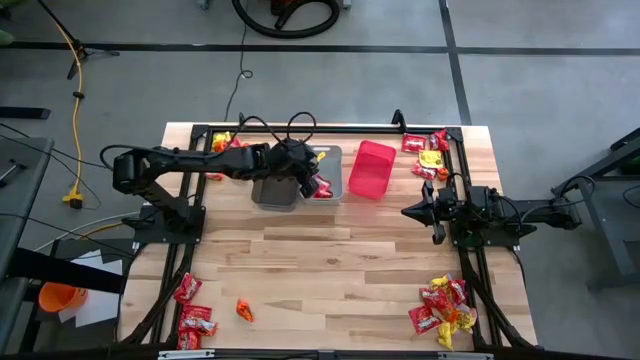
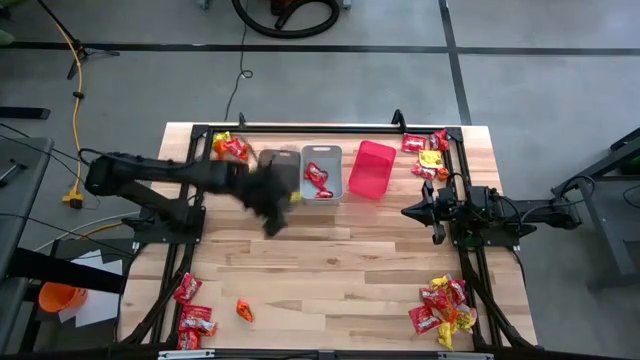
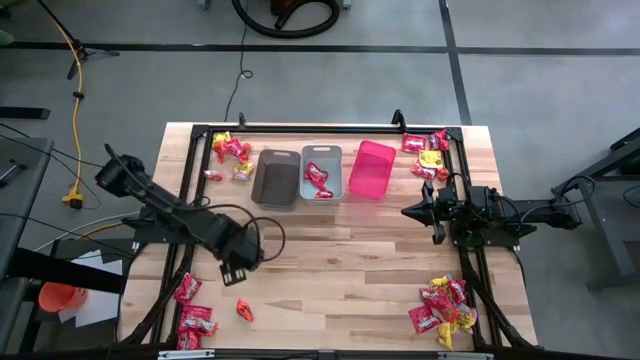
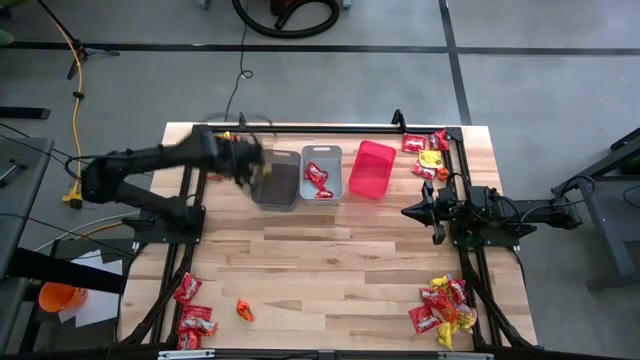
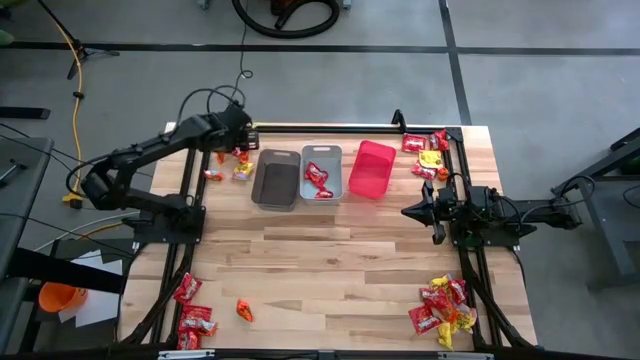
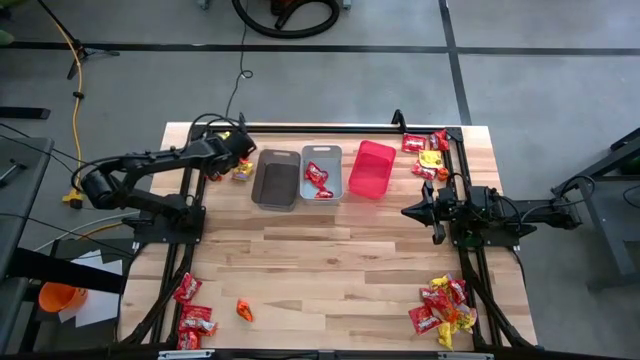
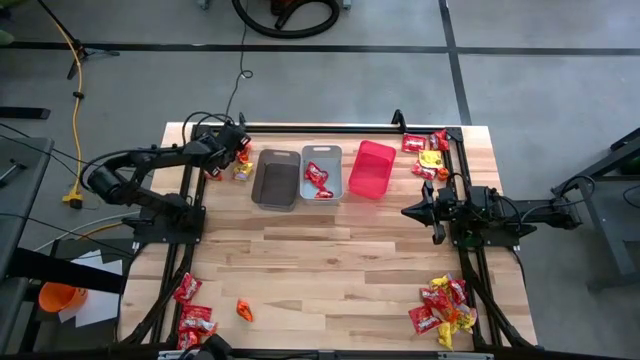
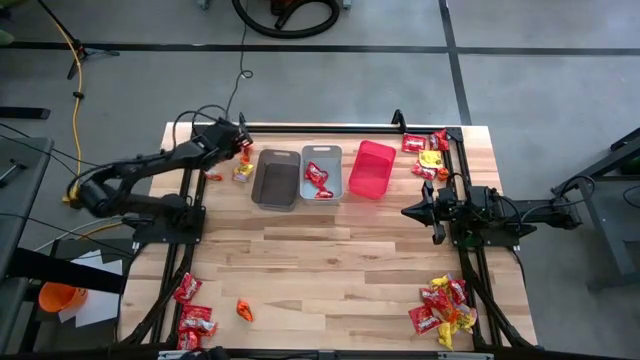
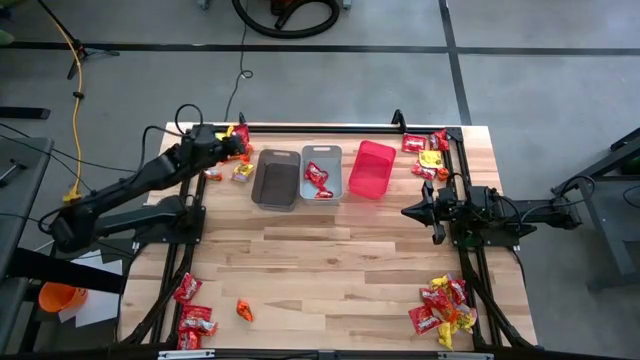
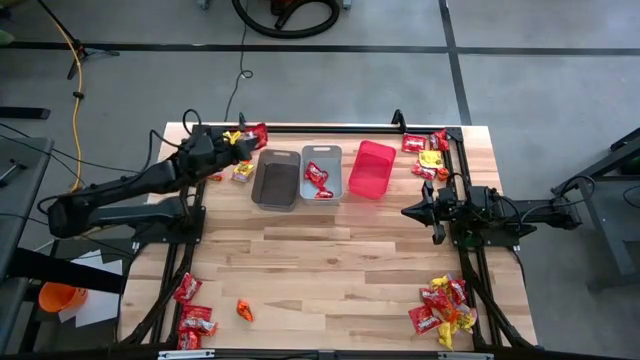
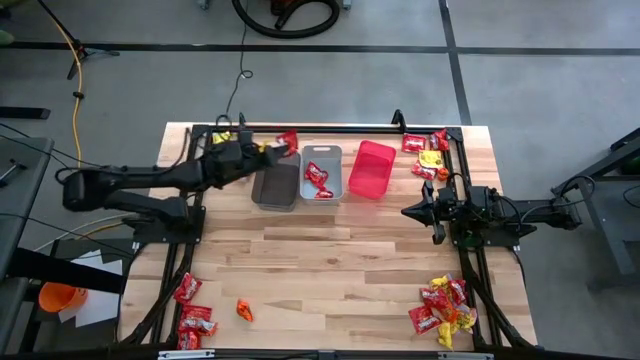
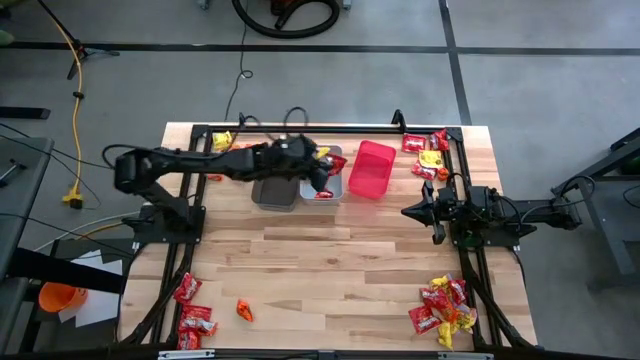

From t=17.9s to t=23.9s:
Task: Sort candy
Put the top left red candy into the gray bin

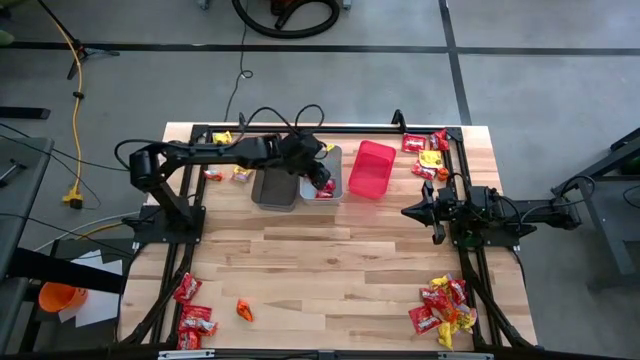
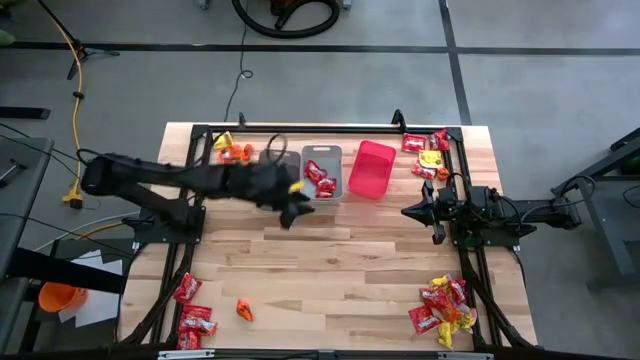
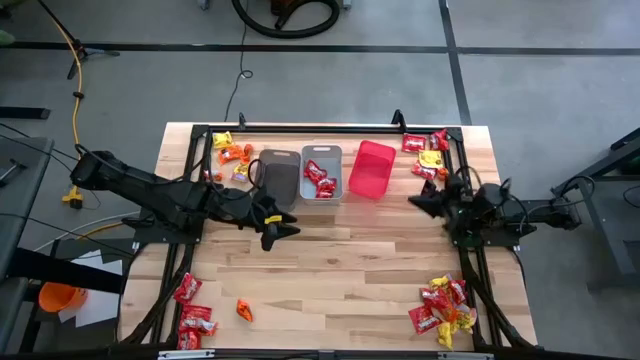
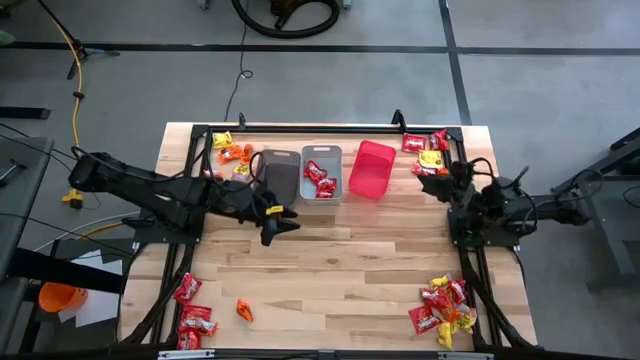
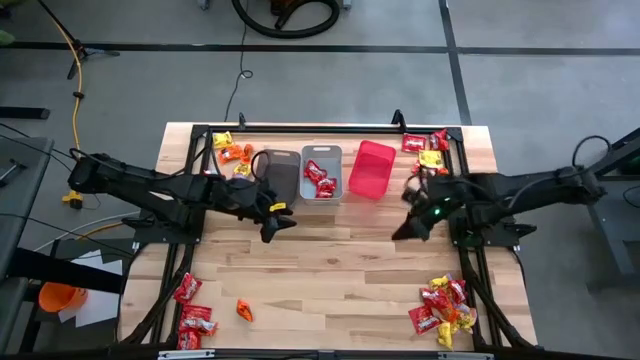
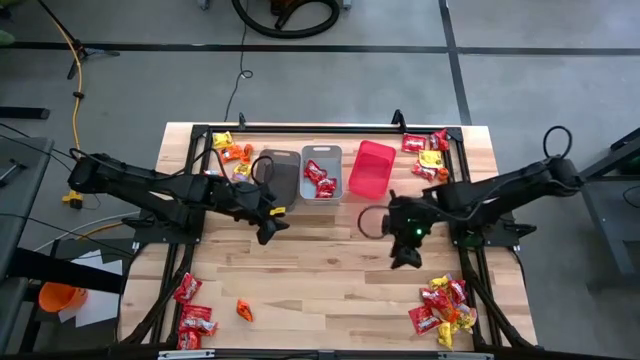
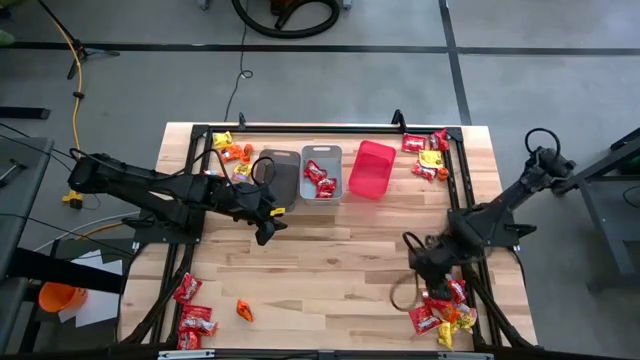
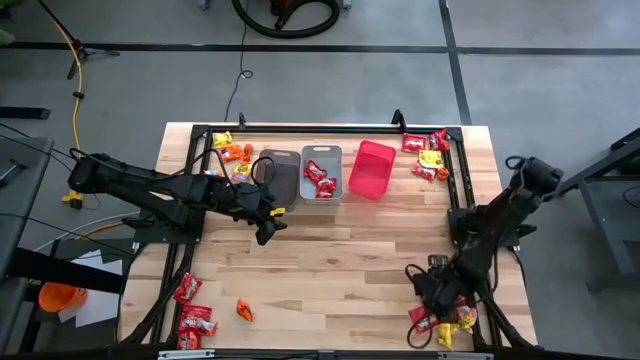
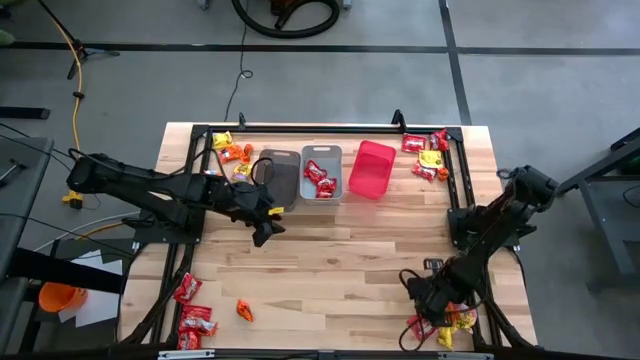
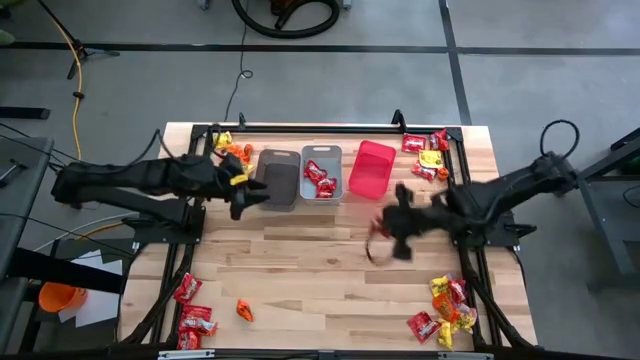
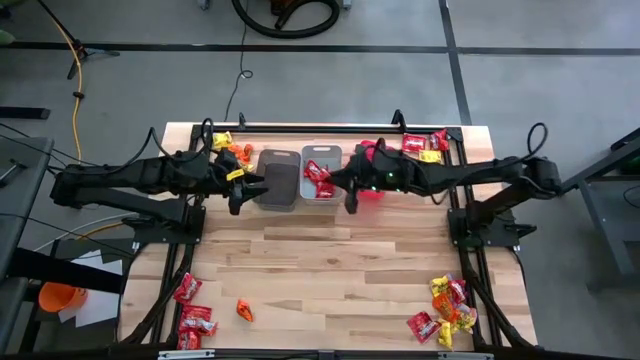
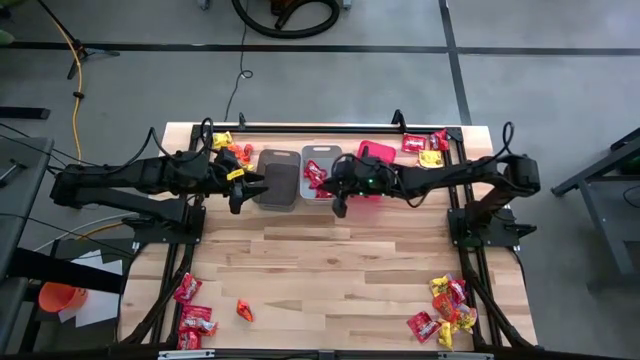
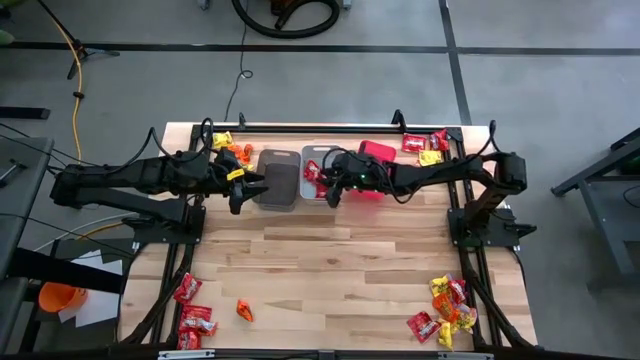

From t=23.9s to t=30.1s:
Put the bottom right red candy into the gray bin

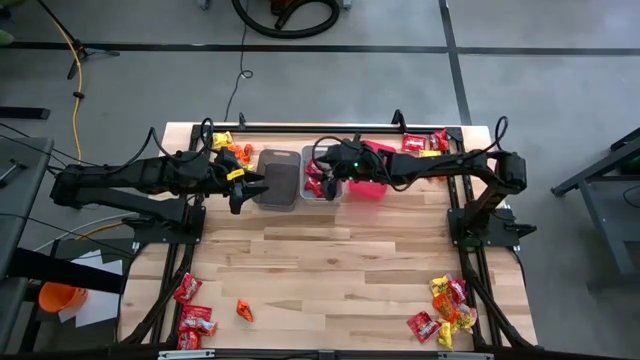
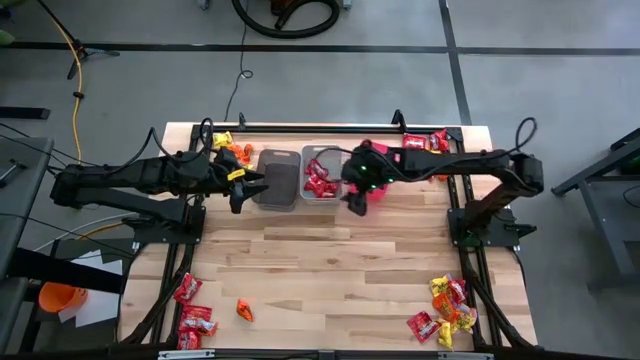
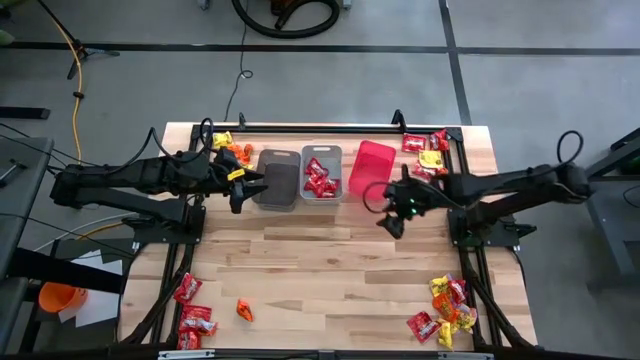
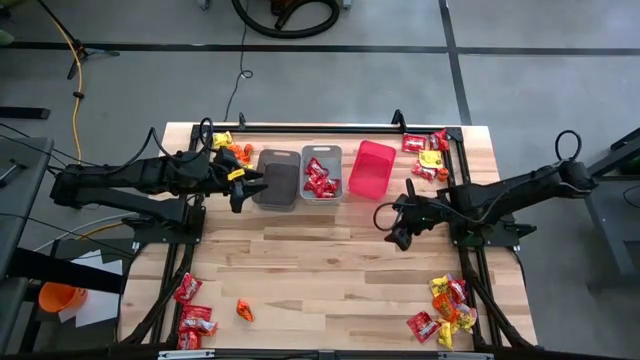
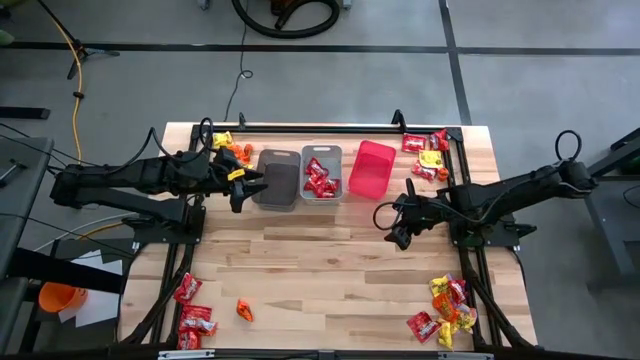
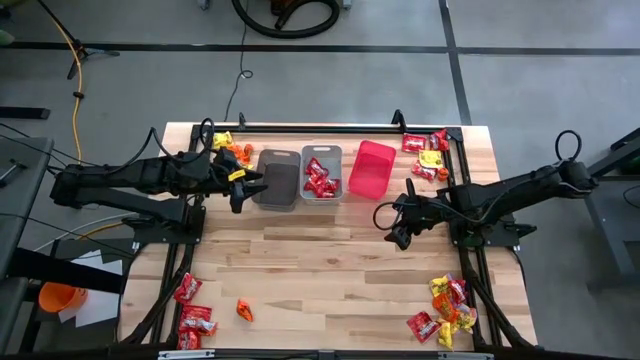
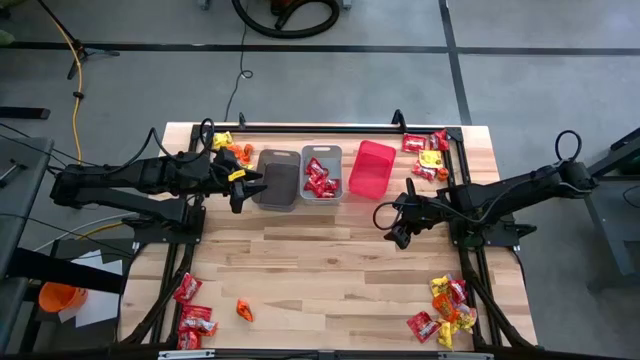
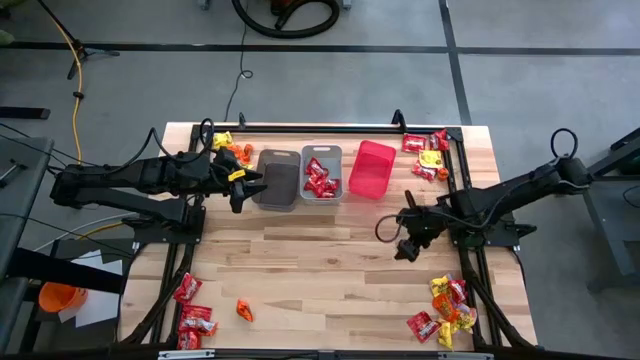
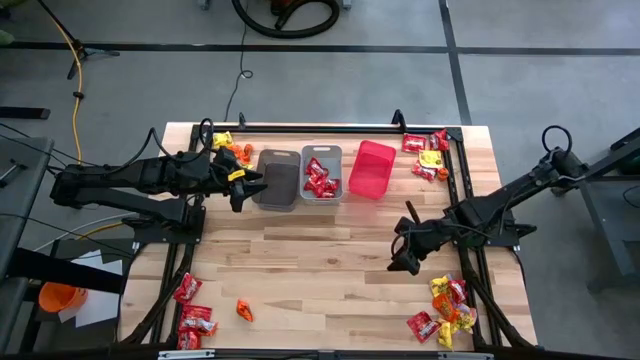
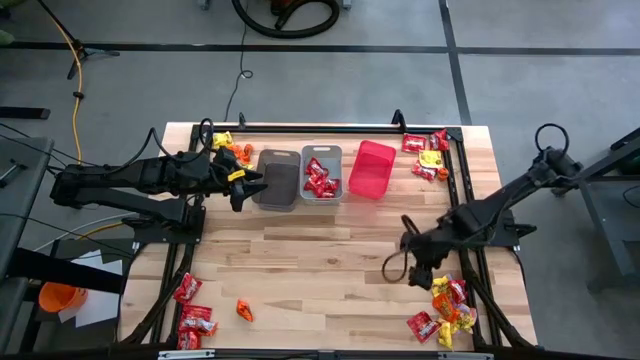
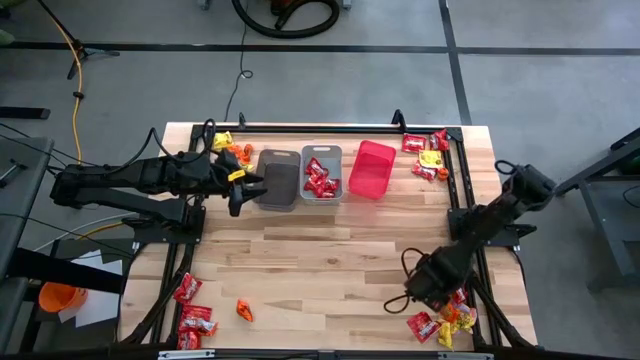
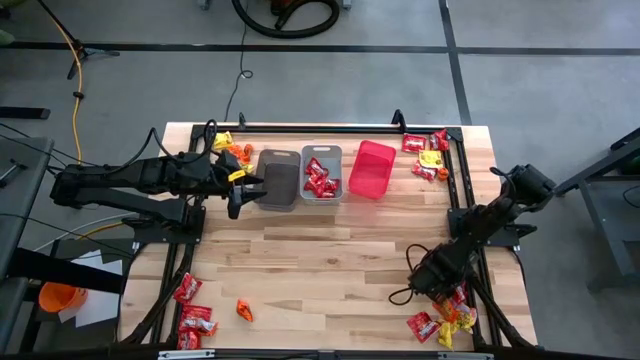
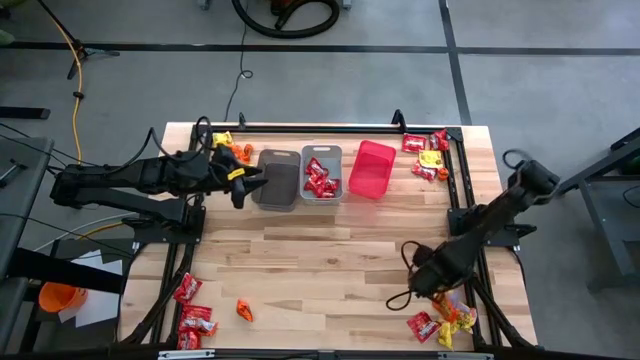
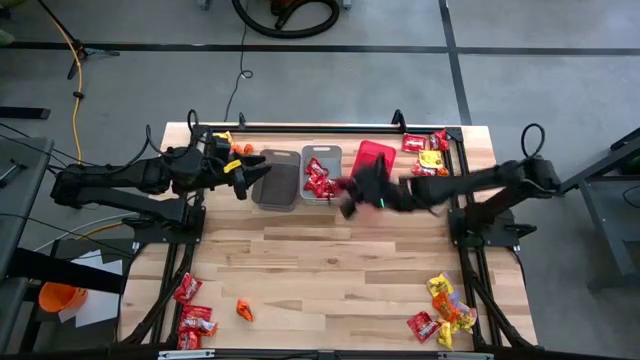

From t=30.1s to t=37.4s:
Put the bottom right red candy into the gray bin

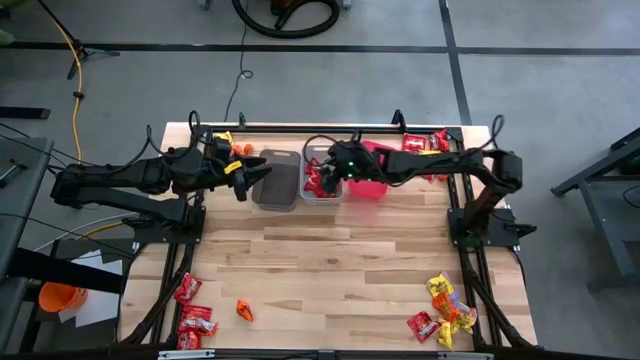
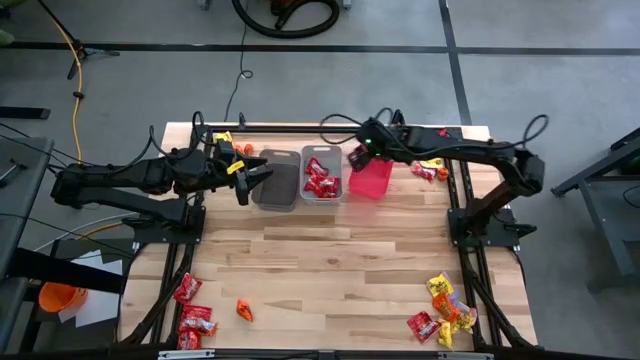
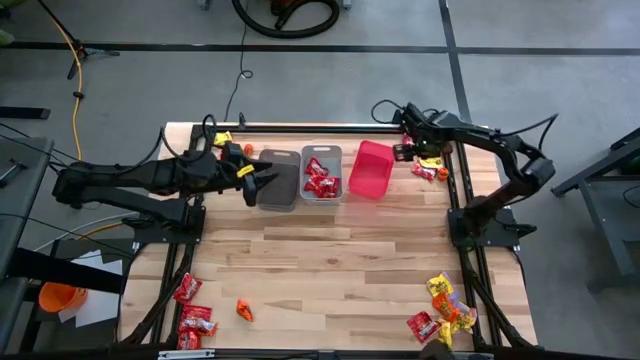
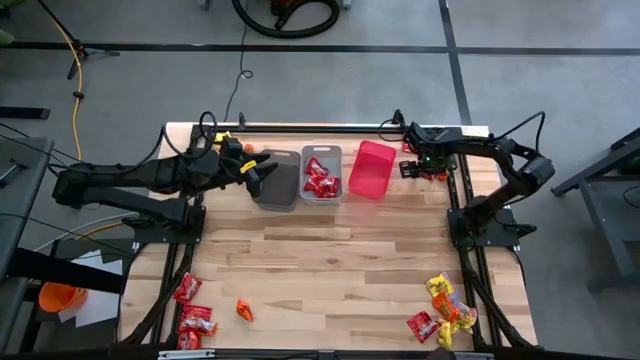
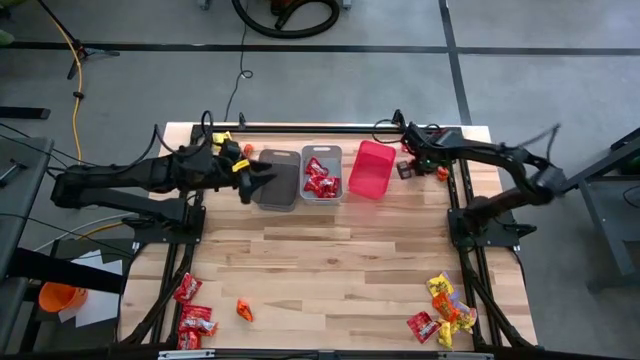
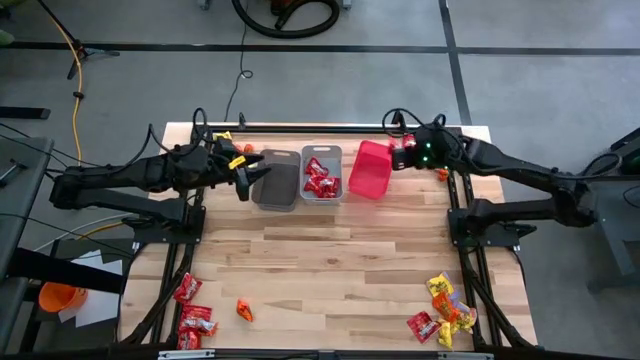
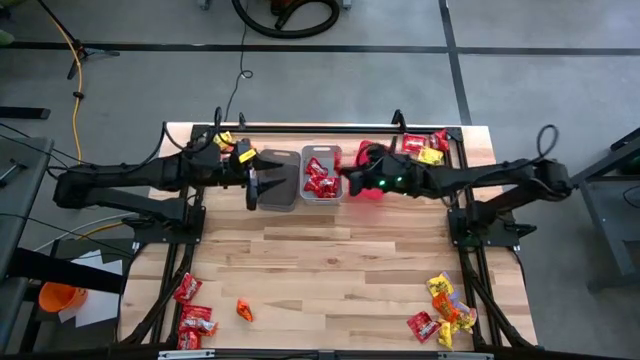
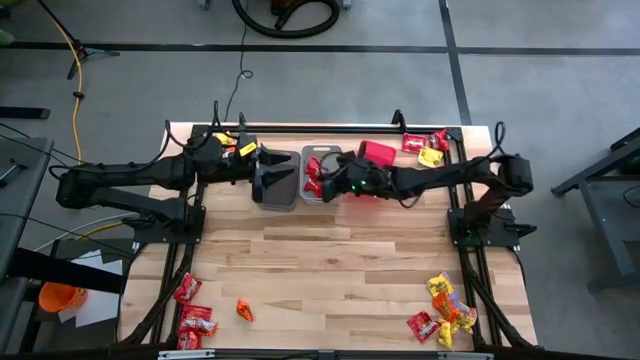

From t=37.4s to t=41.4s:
Put the top right red candy into the gray bin
